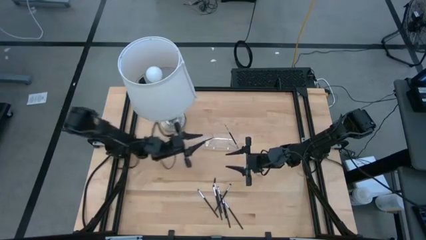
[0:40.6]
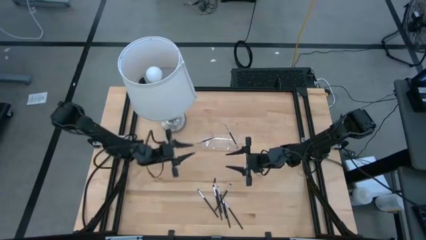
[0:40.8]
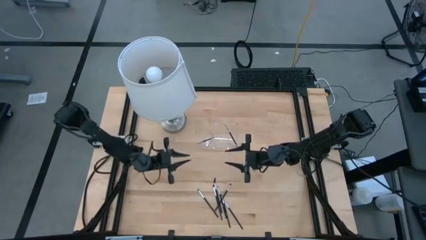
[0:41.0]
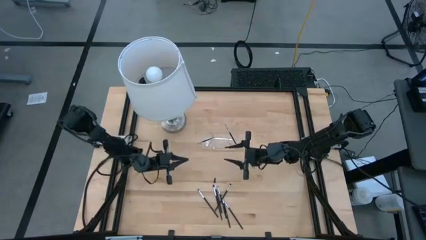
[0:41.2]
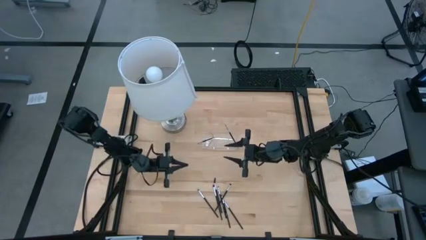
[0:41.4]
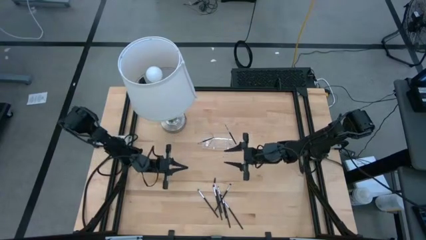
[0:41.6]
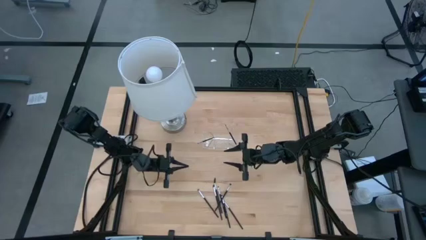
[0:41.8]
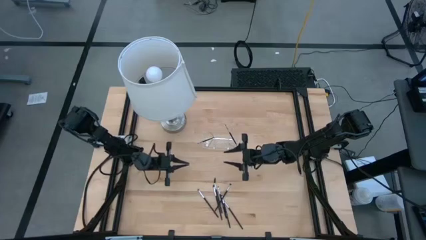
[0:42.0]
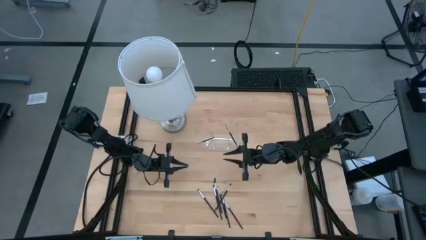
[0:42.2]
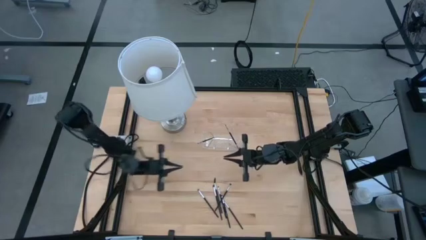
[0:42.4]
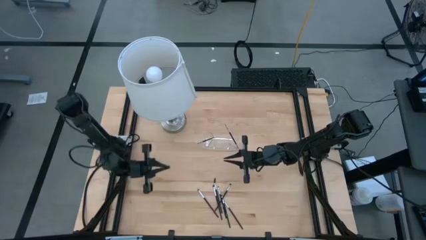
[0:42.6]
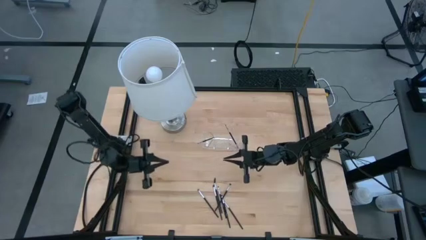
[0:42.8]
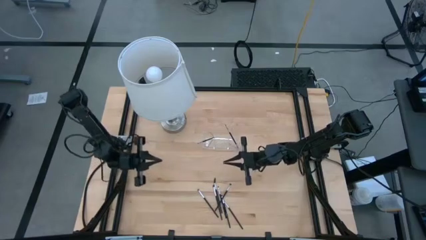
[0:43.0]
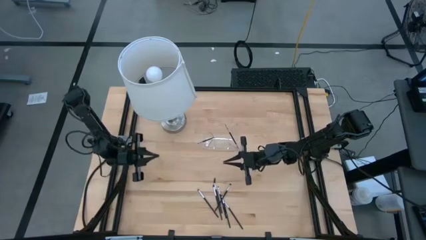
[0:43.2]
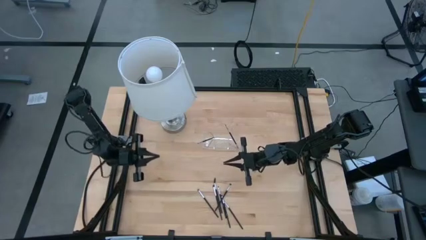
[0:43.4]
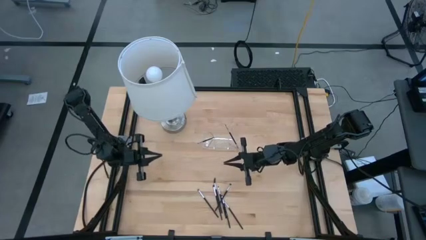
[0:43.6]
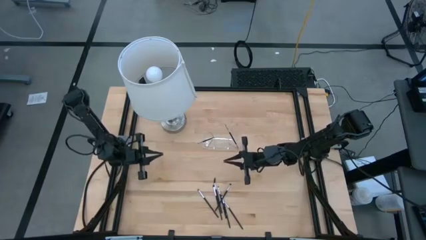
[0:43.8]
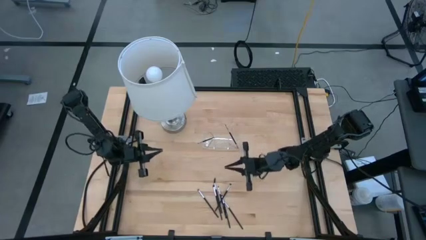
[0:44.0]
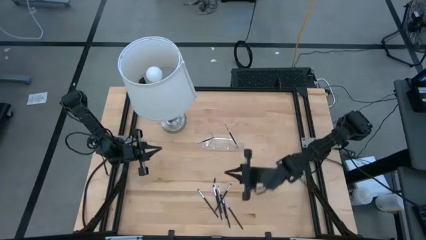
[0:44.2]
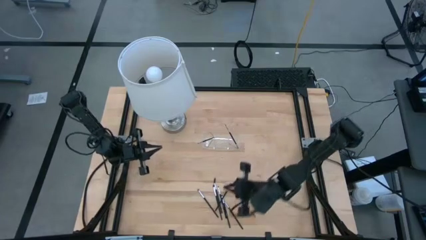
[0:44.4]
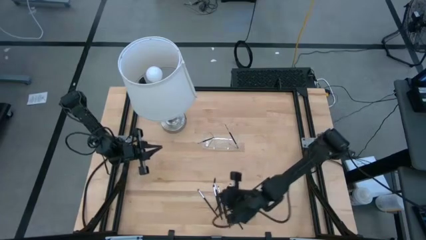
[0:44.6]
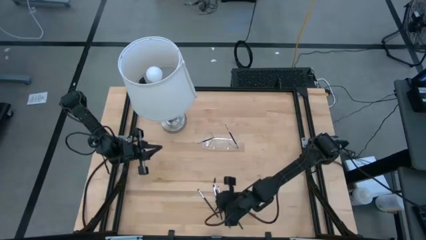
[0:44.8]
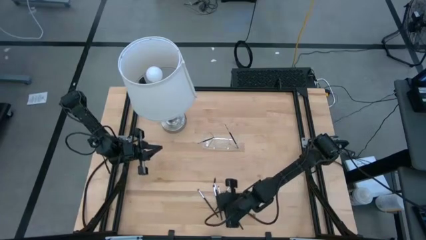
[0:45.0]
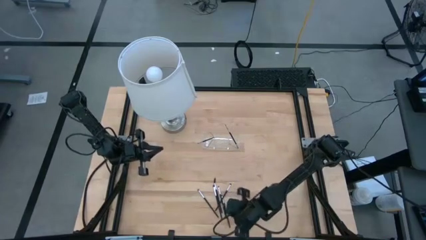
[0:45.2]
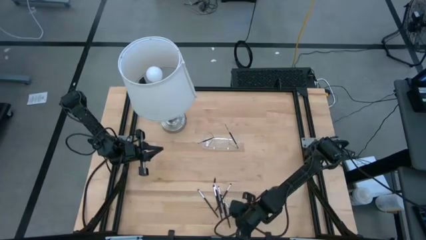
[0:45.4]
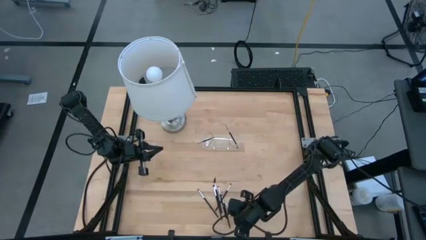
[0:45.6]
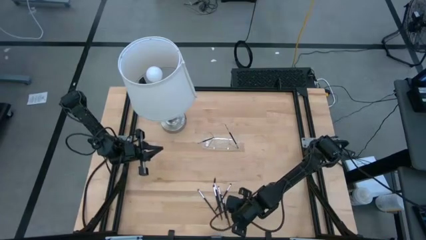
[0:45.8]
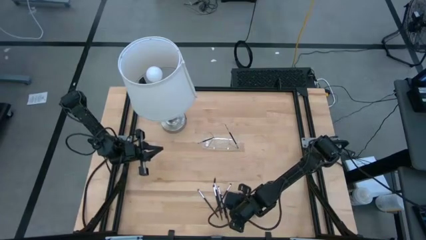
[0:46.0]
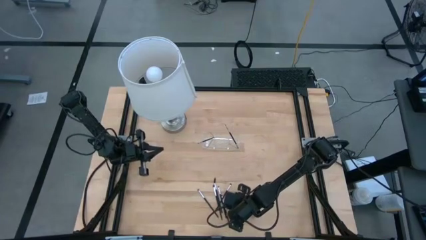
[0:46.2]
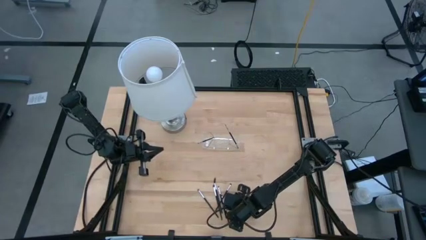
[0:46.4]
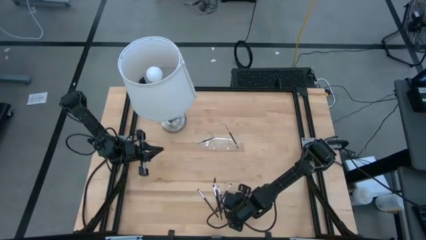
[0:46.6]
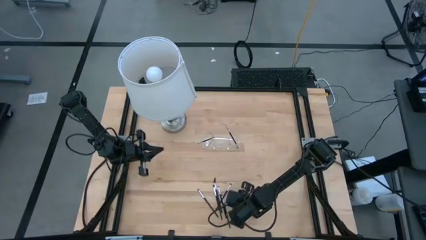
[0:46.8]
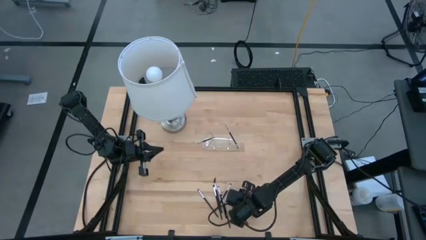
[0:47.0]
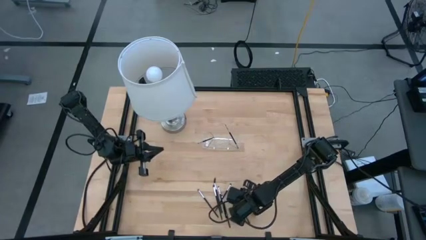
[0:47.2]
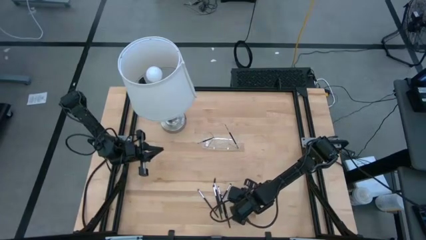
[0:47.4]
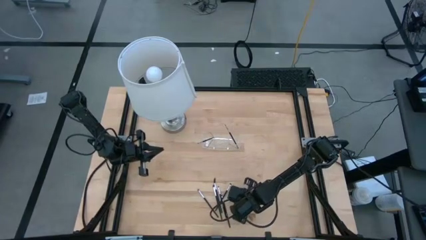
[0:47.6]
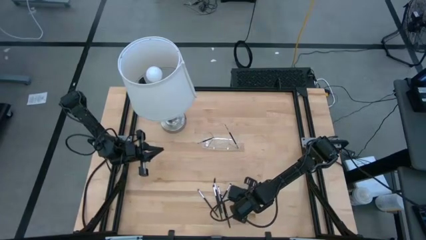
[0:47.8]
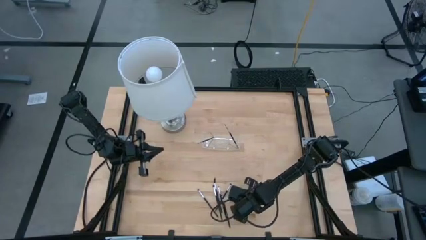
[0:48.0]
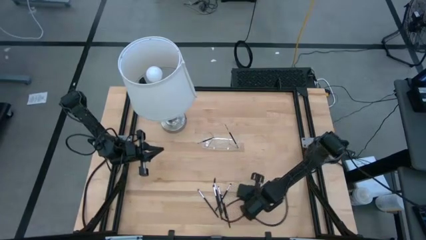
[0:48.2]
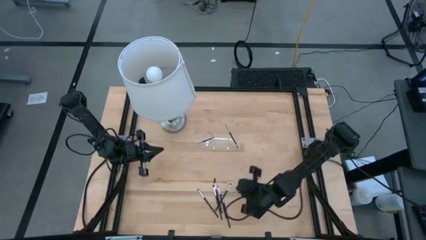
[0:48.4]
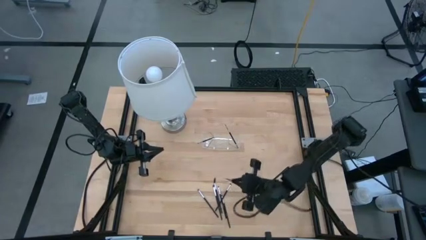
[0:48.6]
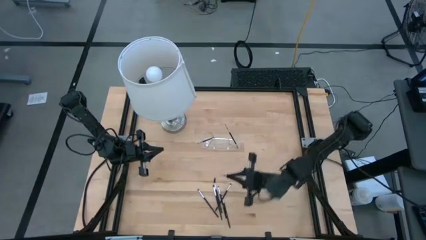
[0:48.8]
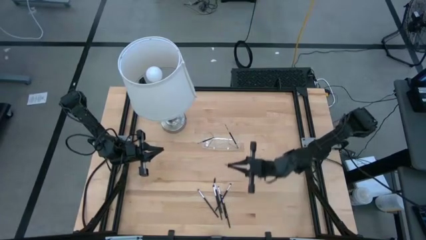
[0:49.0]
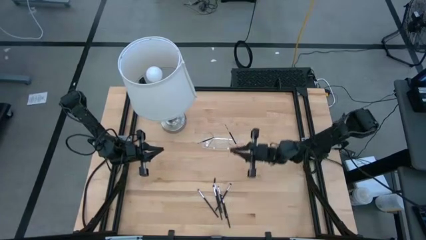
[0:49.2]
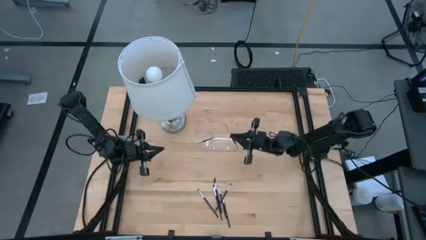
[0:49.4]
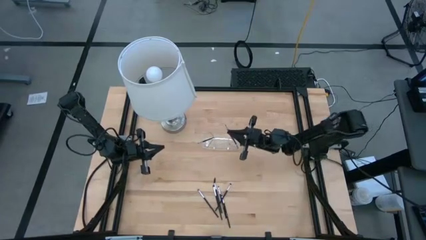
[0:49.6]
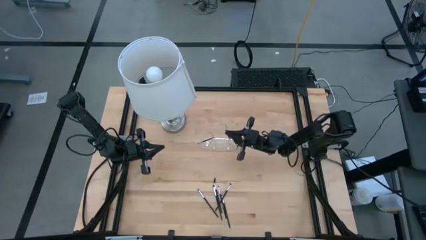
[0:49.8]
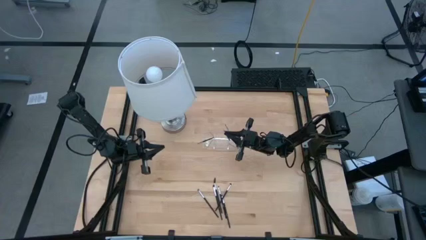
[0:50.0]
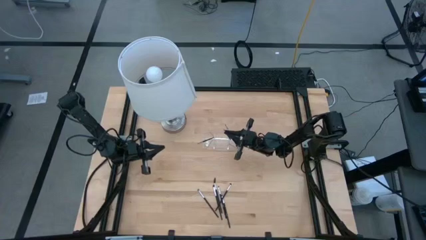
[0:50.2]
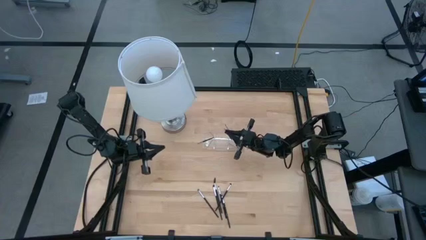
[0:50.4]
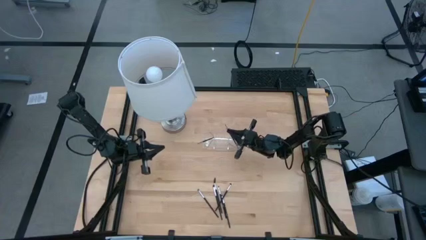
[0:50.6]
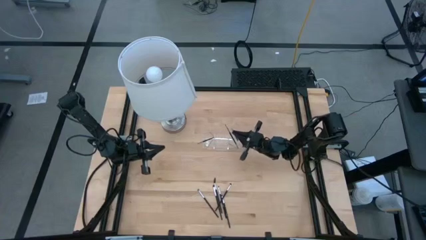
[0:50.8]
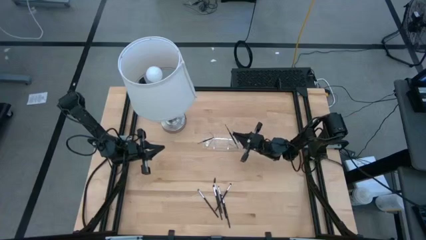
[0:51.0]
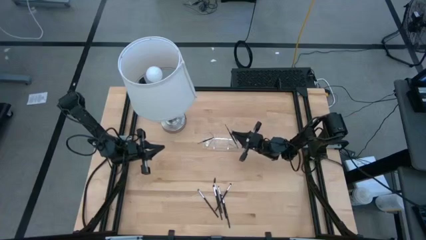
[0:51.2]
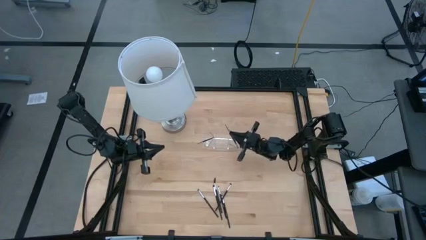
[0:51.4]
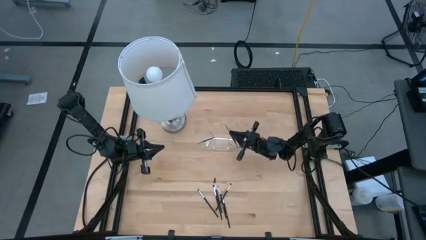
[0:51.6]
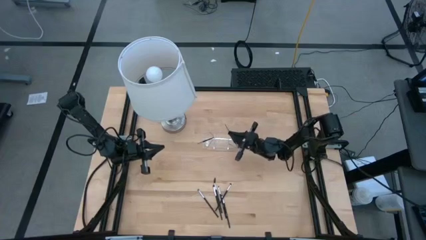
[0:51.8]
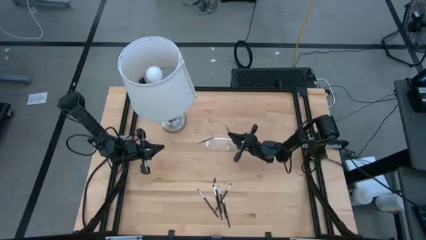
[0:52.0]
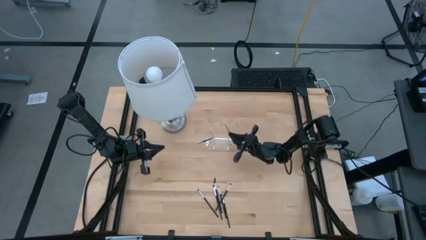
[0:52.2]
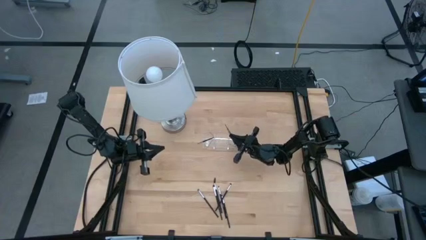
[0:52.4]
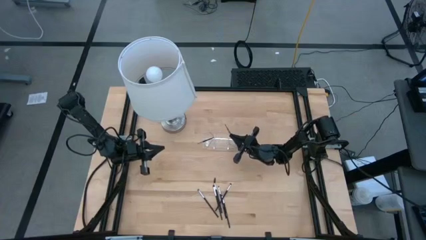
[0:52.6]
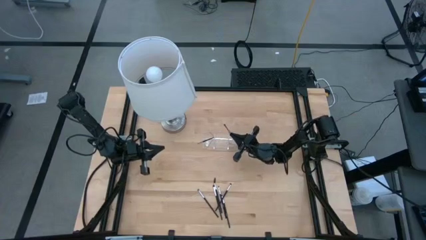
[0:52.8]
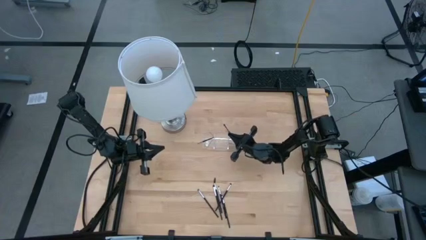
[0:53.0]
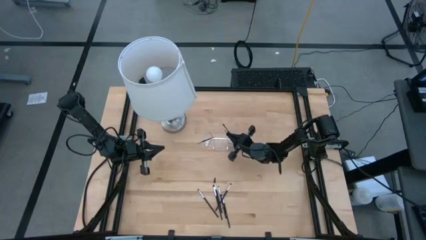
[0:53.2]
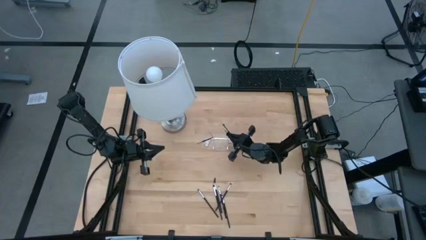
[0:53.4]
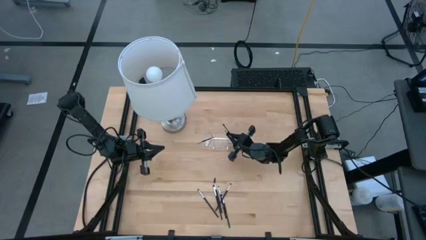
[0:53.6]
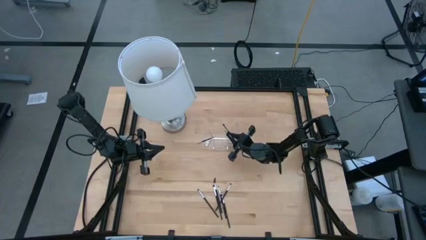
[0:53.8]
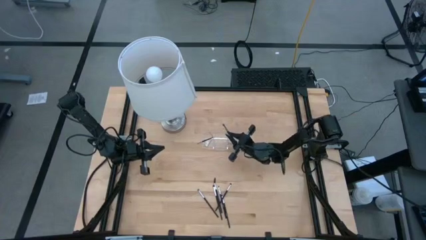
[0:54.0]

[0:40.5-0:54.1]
Task: Sort items
Put the liner brush into the transparent organizer

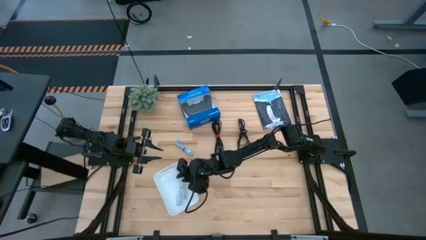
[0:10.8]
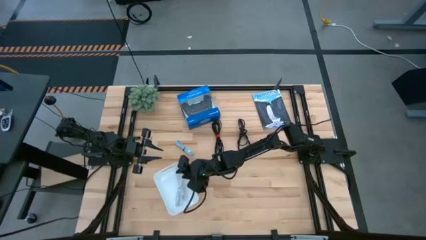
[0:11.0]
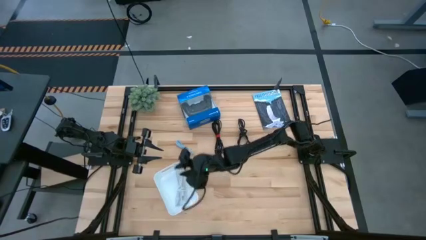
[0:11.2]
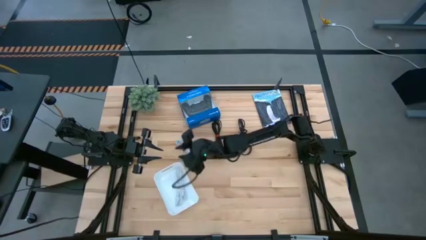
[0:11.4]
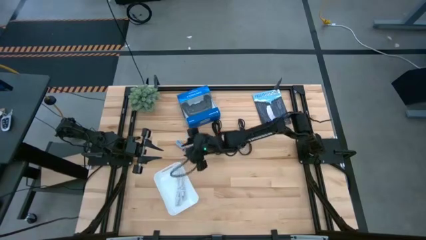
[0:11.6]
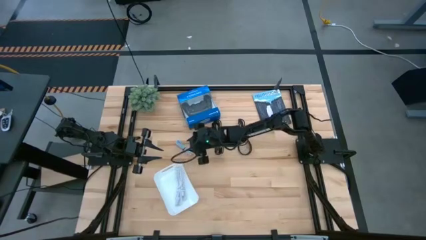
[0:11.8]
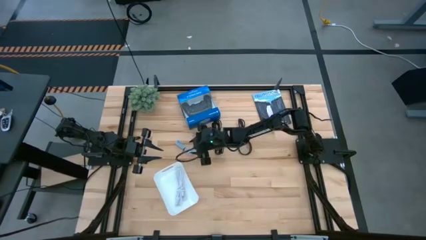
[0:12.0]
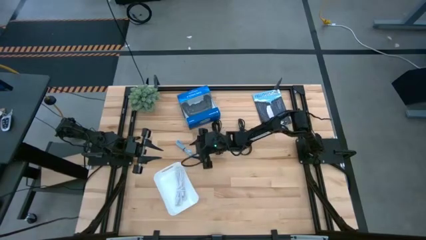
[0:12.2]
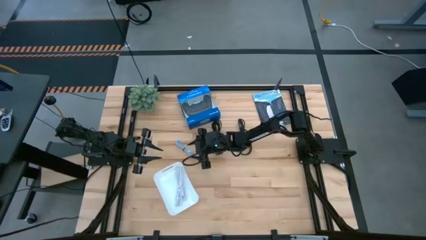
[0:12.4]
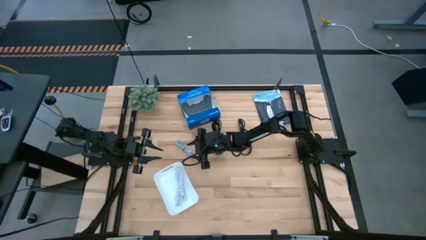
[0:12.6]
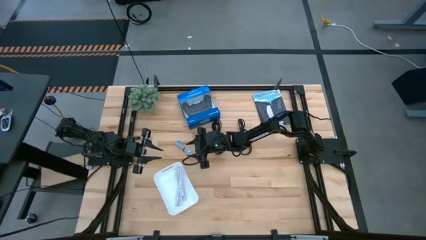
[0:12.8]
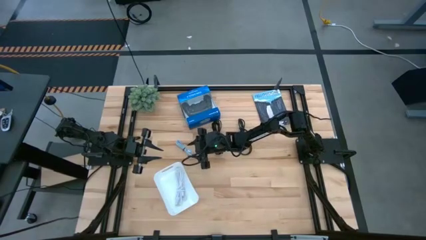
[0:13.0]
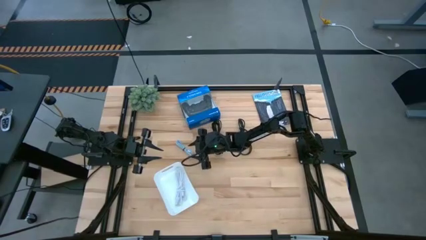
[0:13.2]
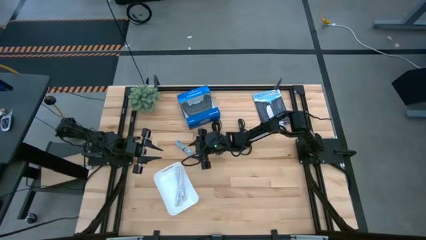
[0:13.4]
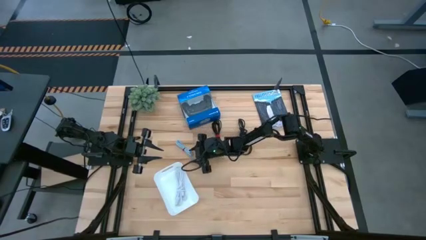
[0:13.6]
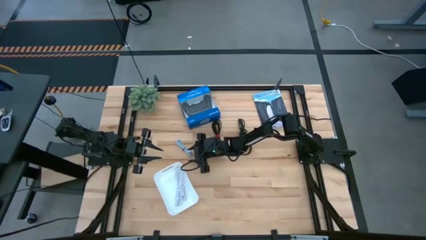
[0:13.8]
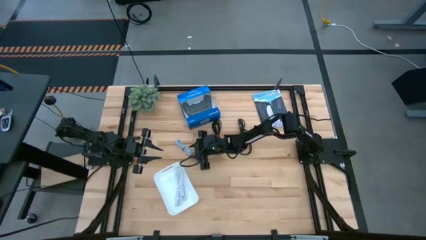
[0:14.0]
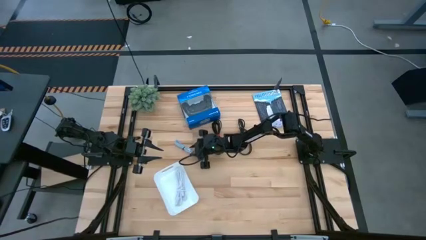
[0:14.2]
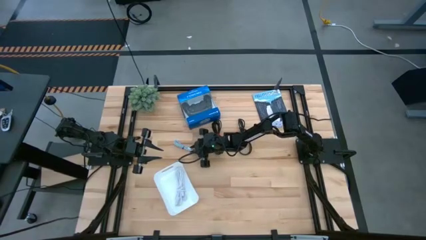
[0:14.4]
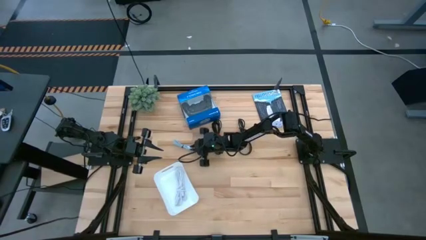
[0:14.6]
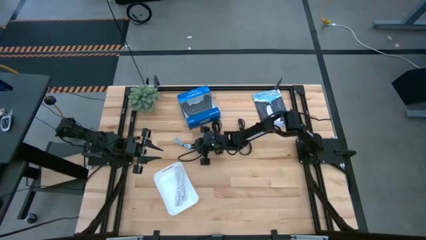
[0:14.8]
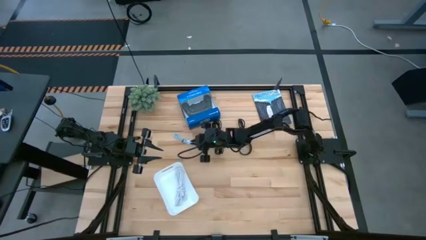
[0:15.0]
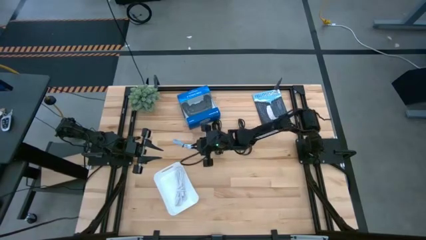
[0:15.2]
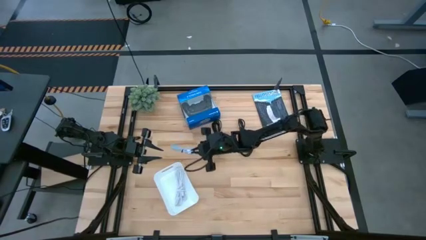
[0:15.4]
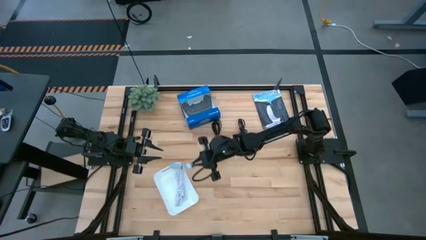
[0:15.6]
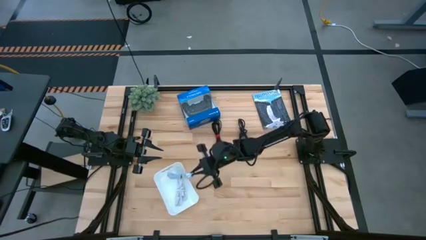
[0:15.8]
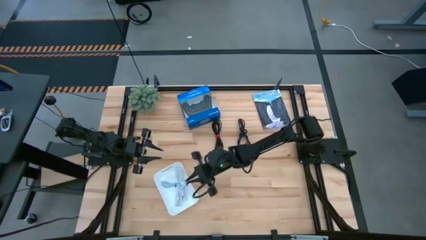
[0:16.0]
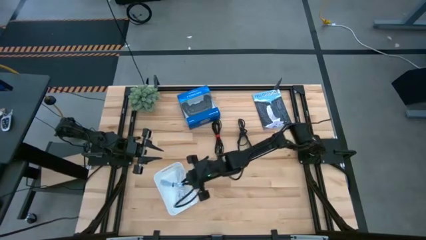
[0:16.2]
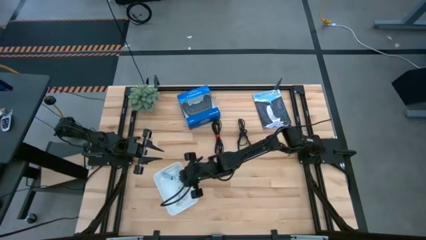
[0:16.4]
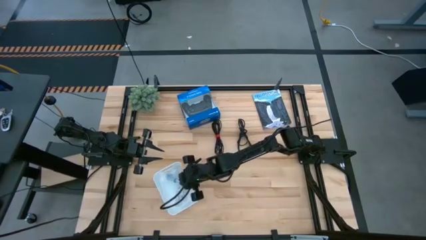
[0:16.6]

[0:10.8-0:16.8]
Task: Pick and place USB-C Cables
Put the blue charger cable into the white basket
